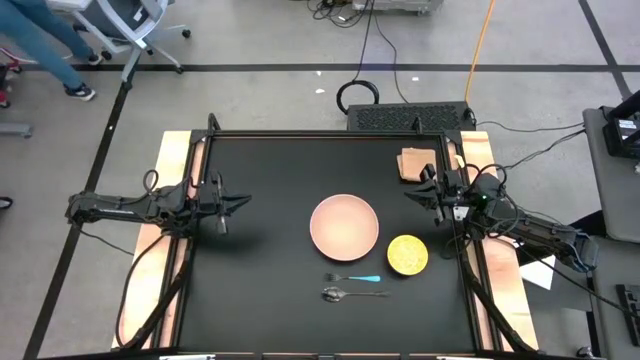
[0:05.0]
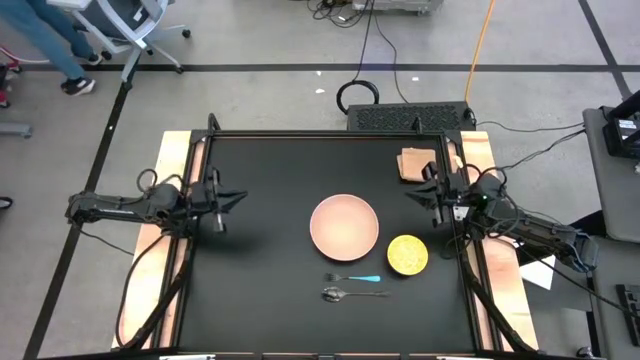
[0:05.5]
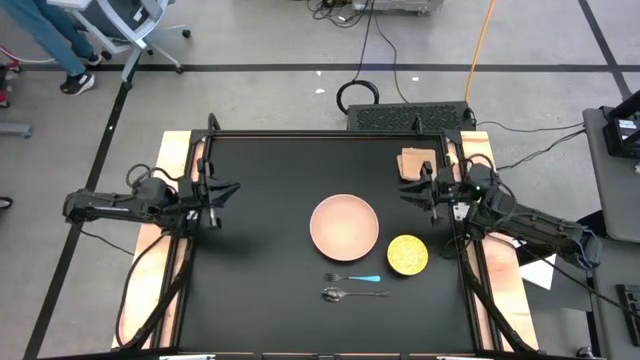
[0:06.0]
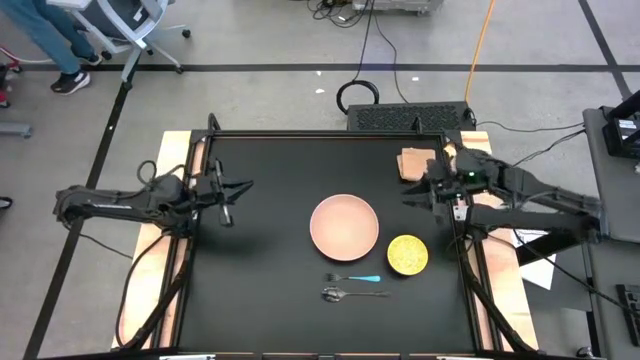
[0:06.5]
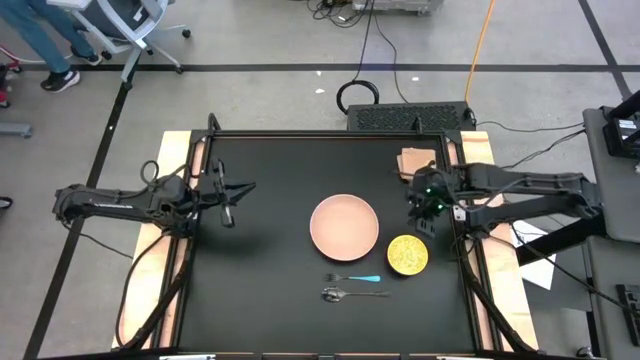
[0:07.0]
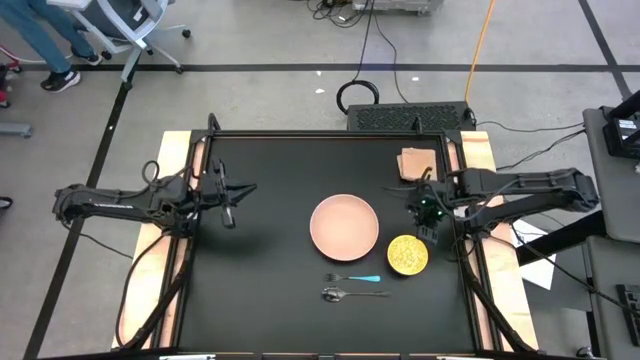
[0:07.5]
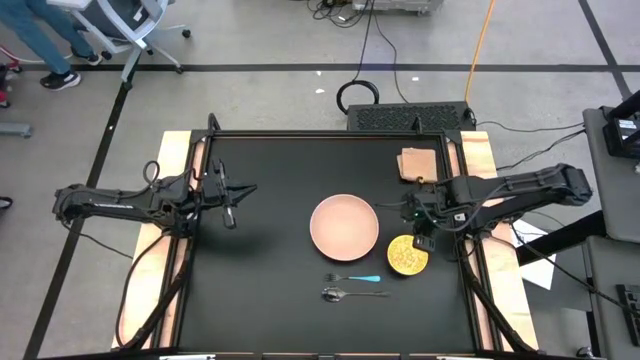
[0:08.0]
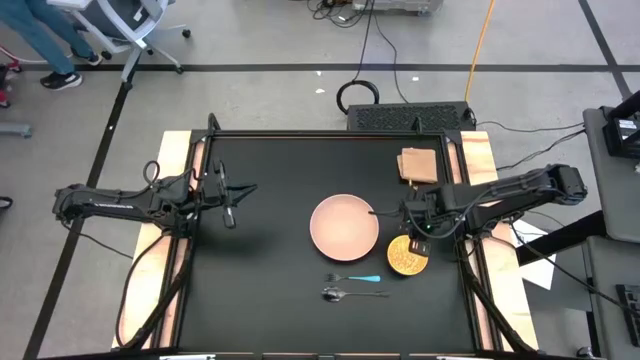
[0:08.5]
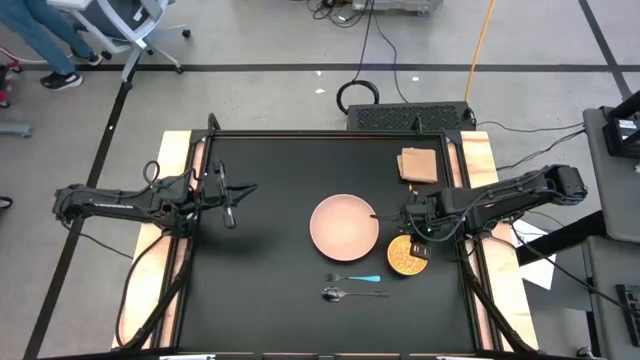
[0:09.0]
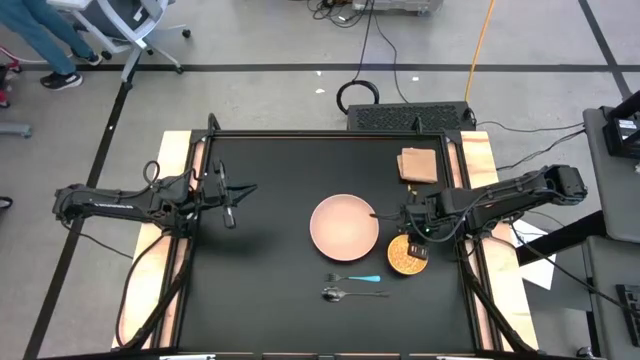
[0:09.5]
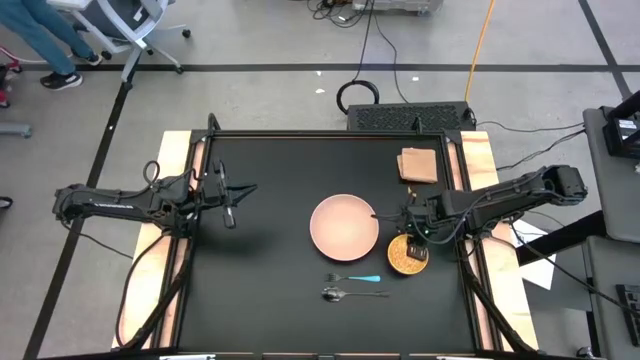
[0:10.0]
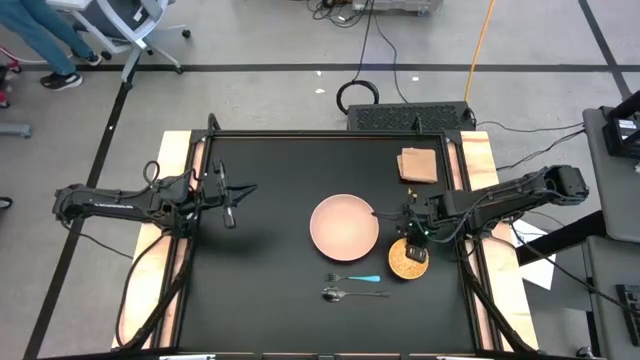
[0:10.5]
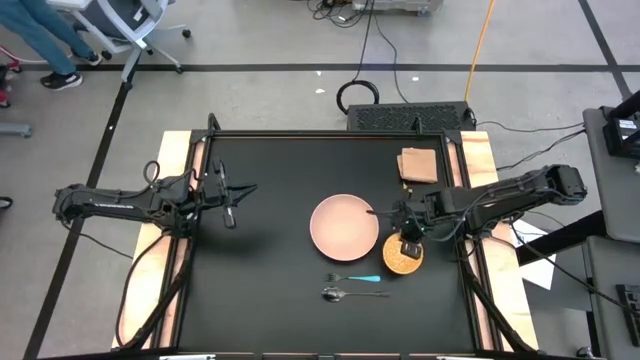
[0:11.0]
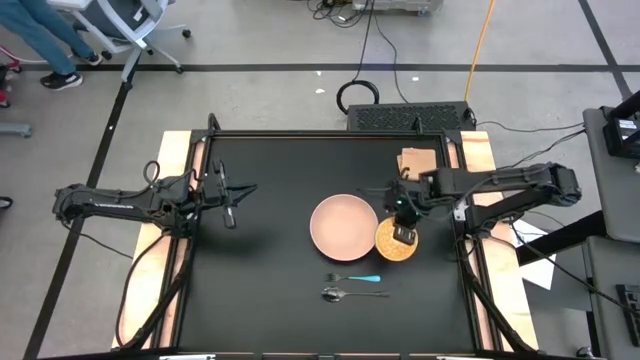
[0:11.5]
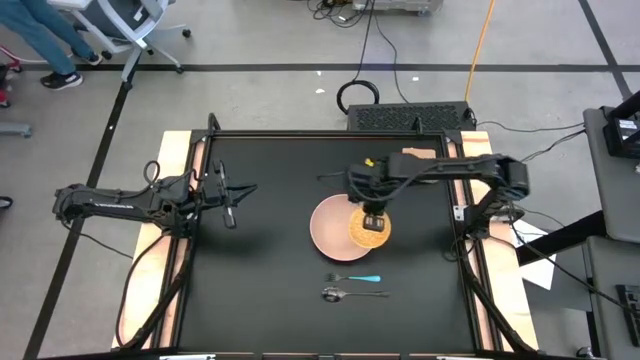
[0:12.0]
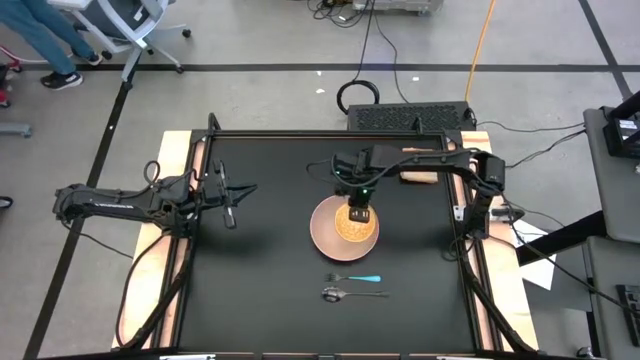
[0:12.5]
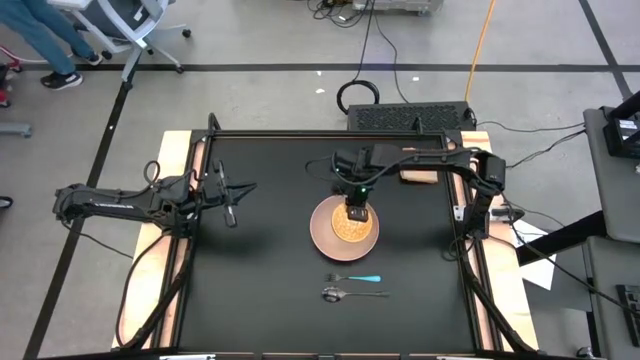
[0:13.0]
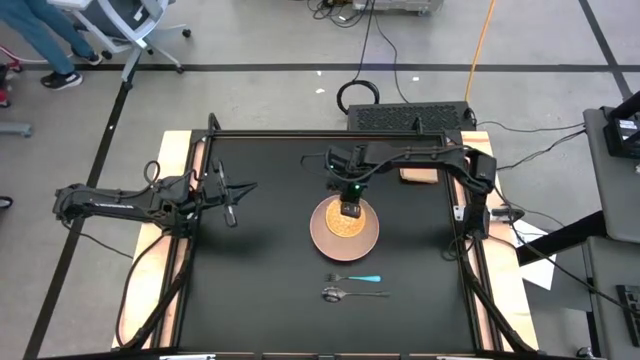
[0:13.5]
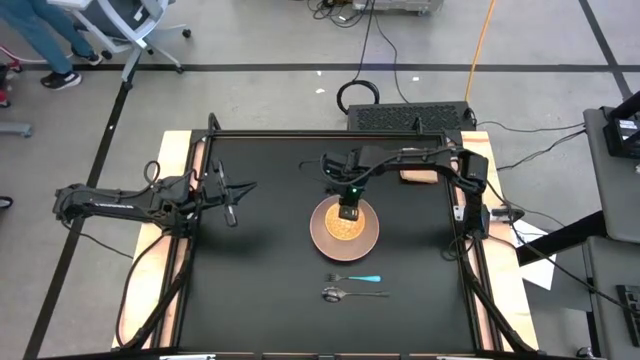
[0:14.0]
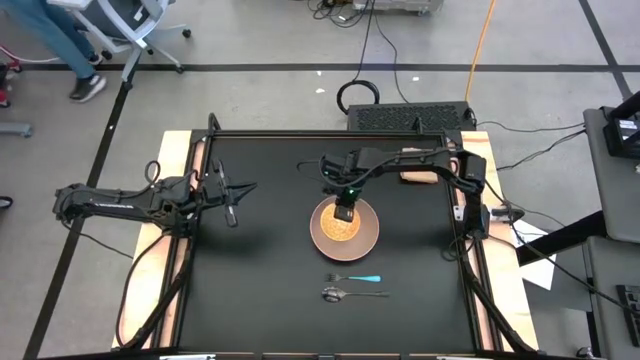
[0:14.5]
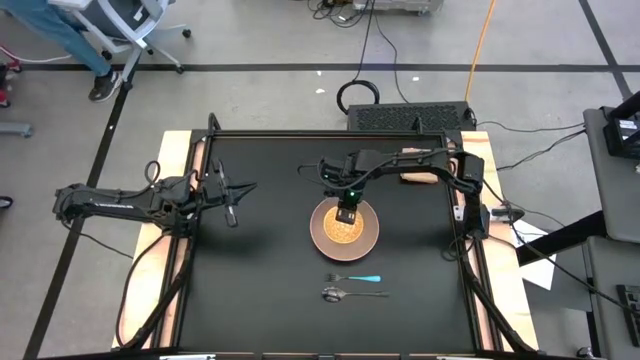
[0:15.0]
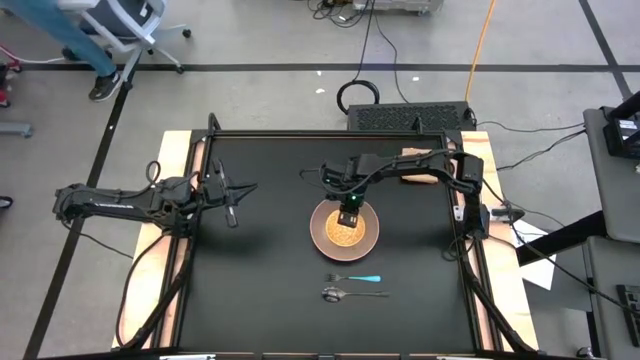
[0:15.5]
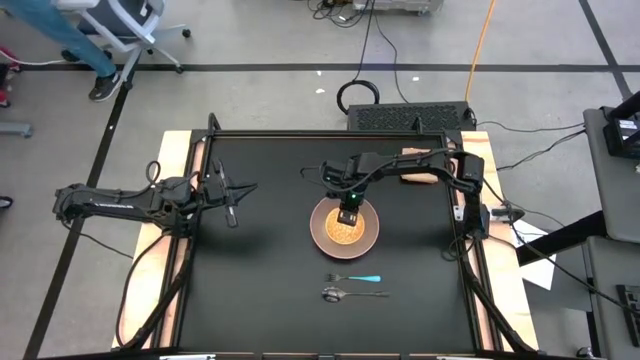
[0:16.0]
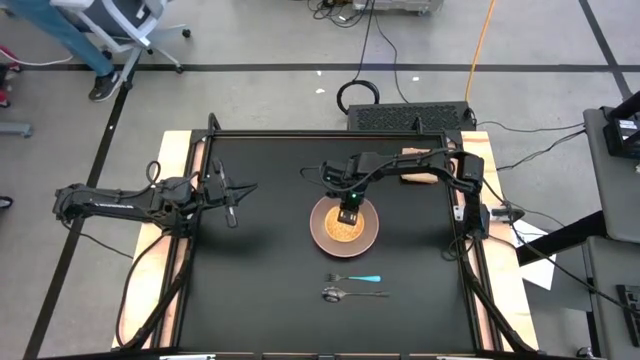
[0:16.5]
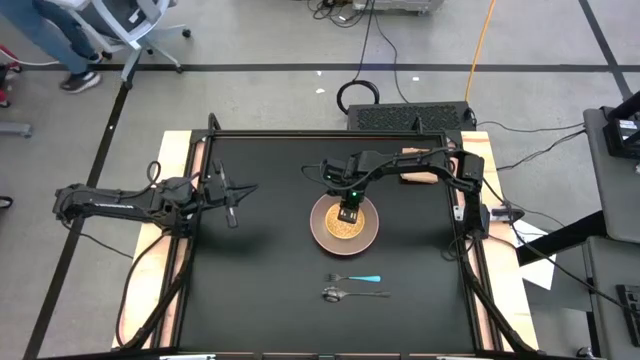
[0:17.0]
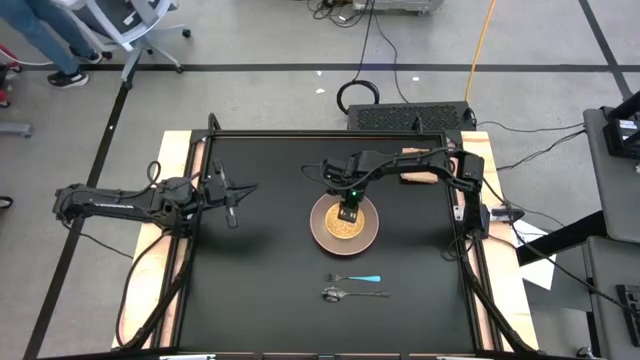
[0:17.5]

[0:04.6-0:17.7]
Task: Set table place
Put the yellow bowl on the brown plate

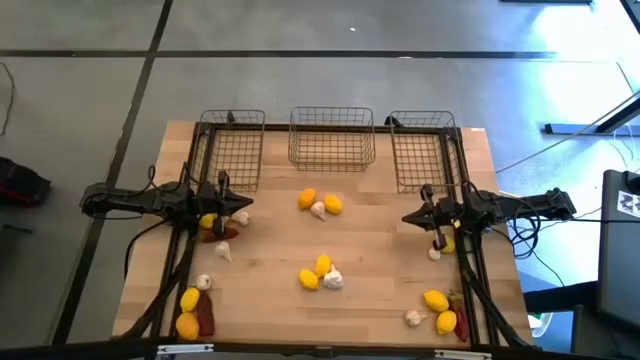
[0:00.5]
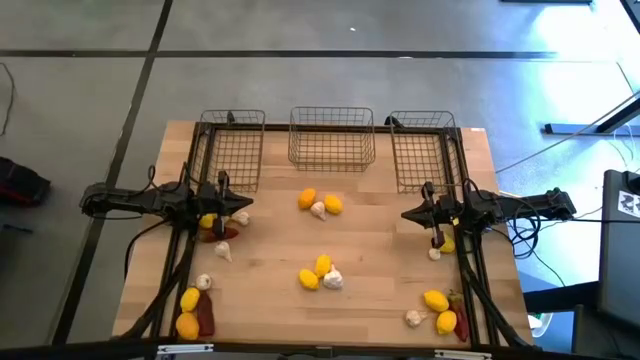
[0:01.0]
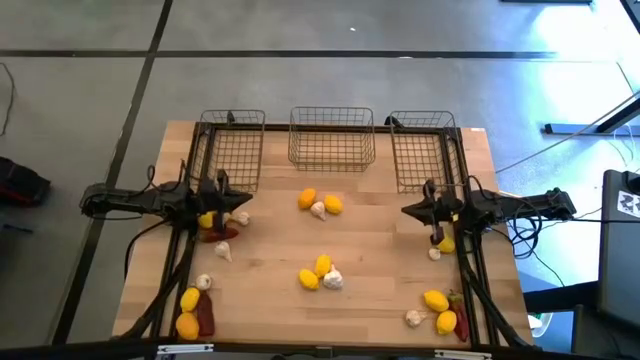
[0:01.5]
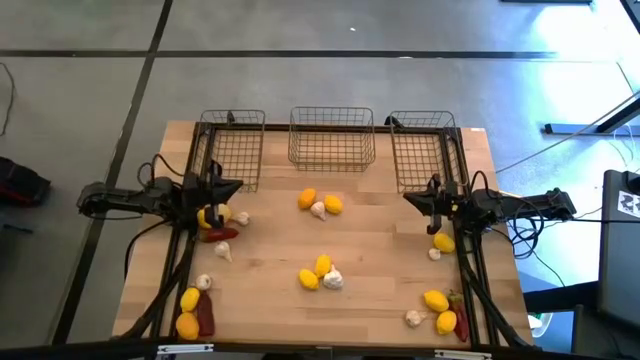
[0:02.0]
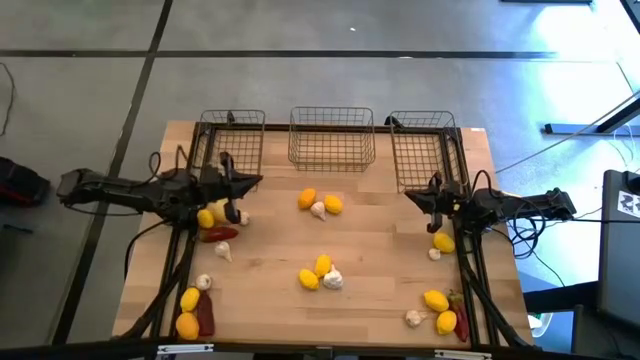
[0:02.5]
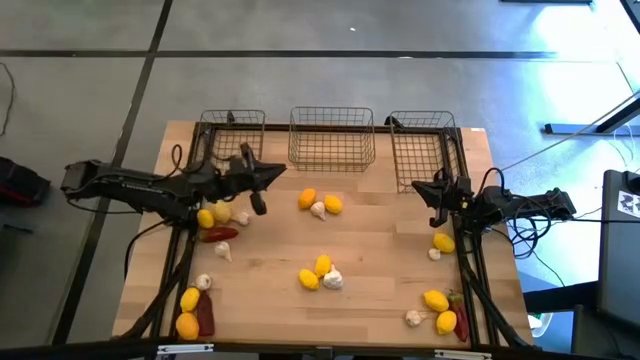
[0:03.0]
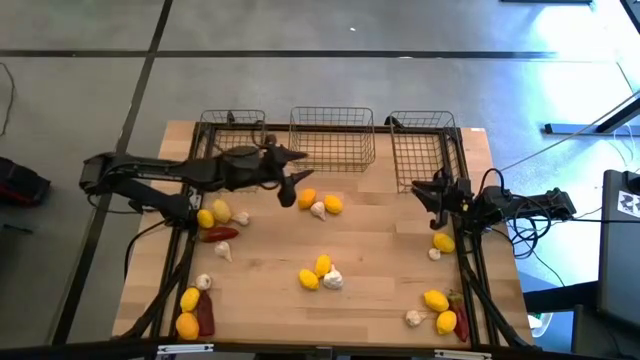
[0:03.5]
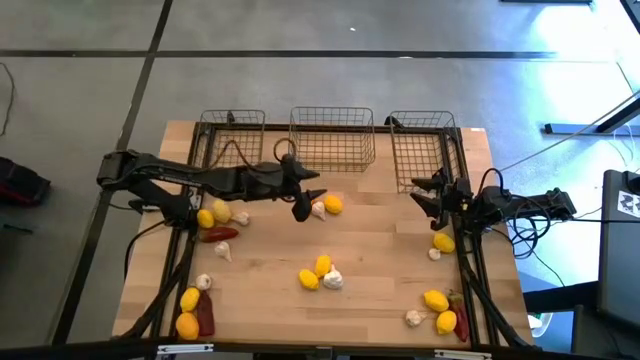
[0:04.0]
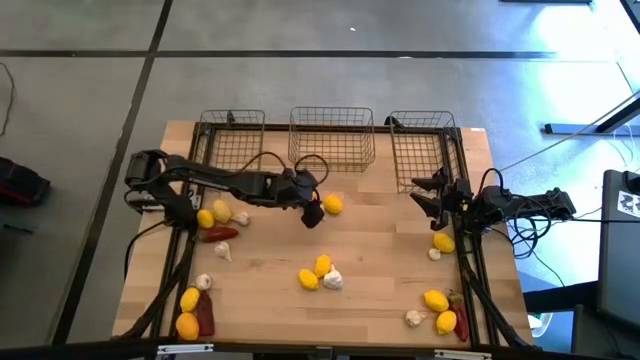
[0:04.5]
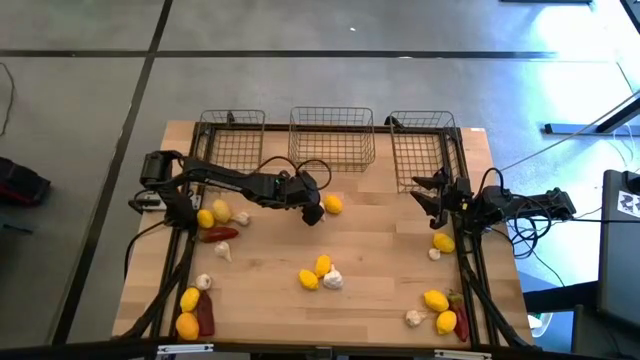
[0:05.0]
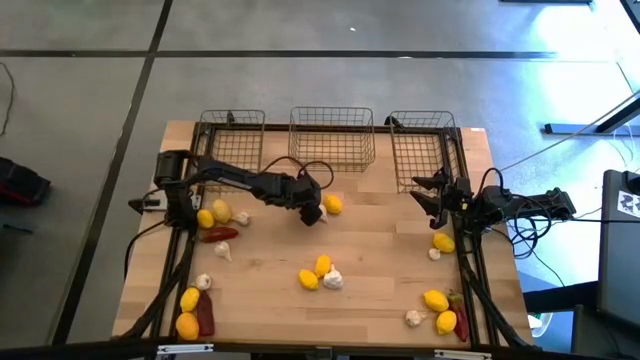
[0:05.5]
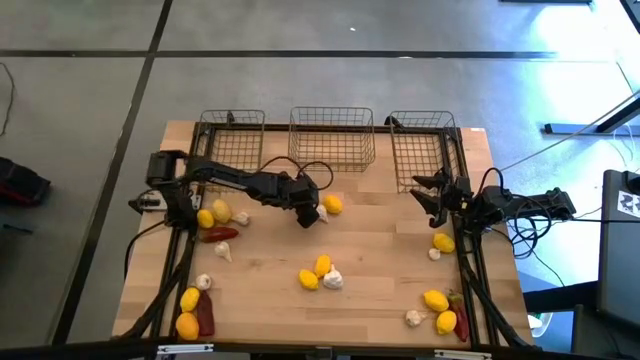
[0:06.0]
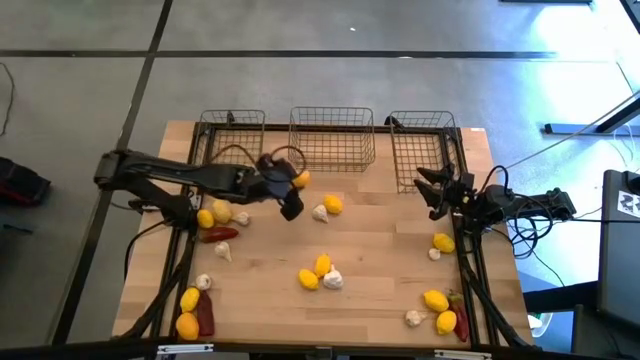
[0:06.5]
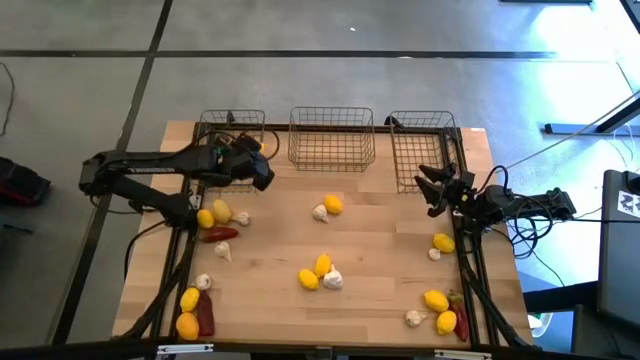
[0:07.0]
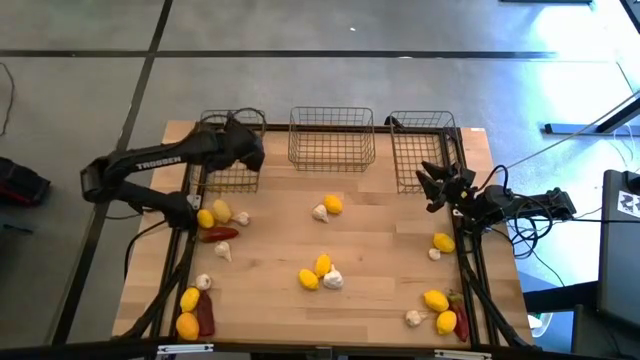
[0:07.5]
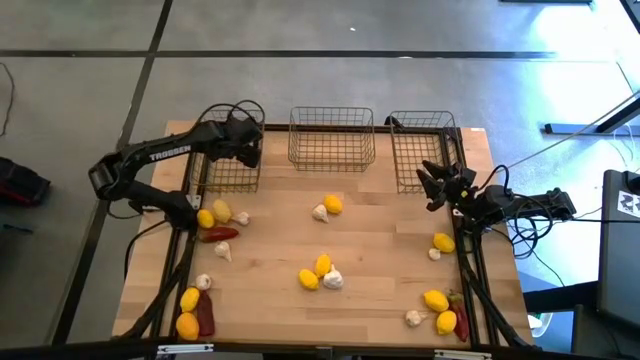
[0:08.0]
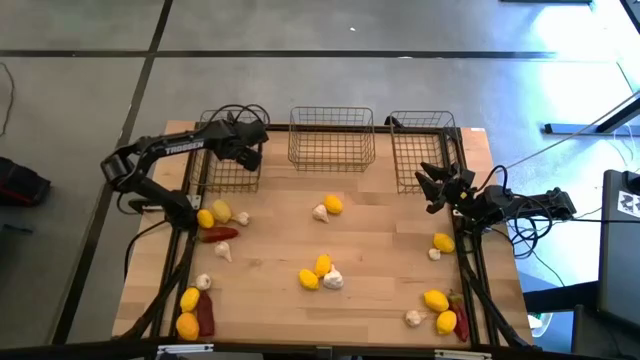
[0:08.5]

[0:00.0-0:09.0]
Task: Sort produce into baskets
Put the yellow lemon into the left gold wire basket
